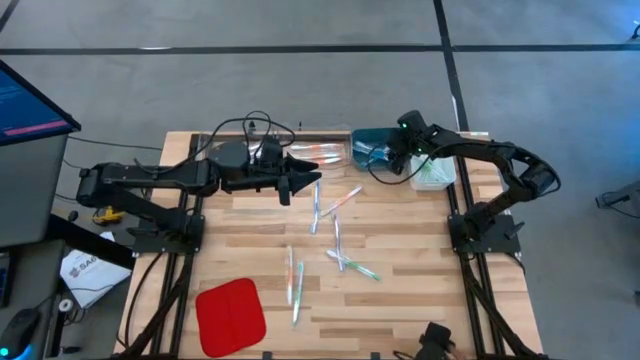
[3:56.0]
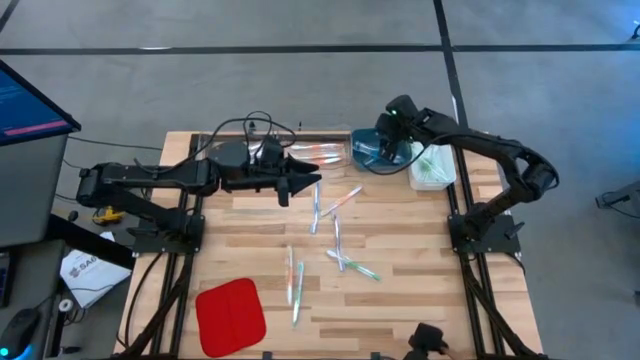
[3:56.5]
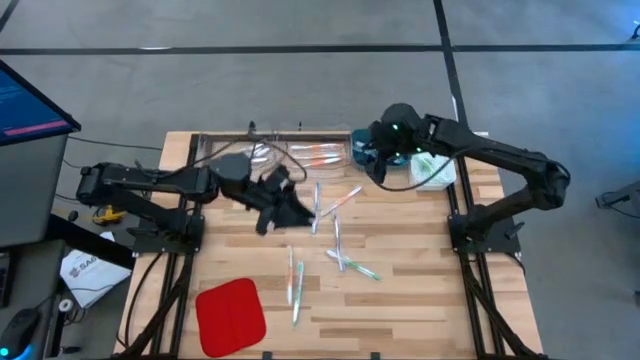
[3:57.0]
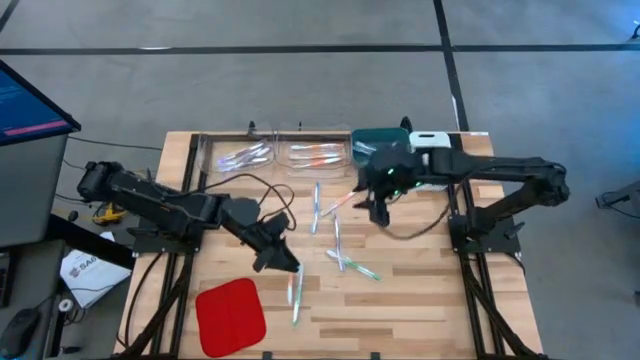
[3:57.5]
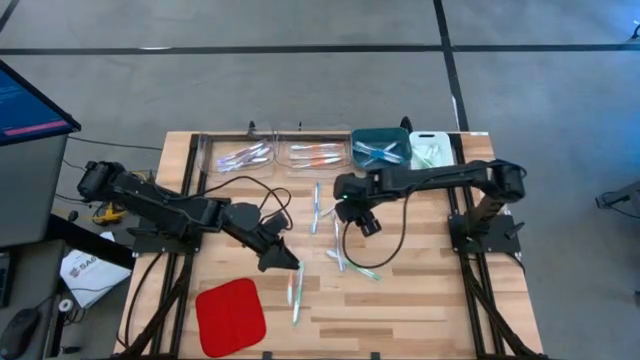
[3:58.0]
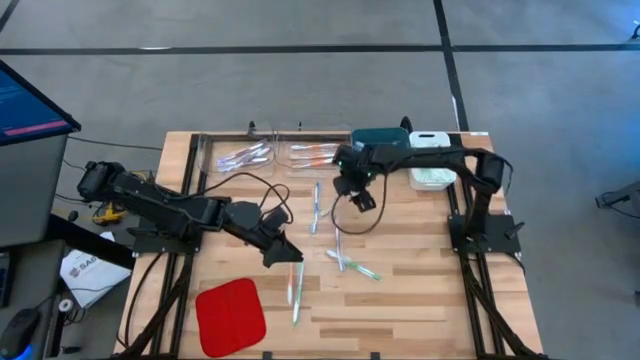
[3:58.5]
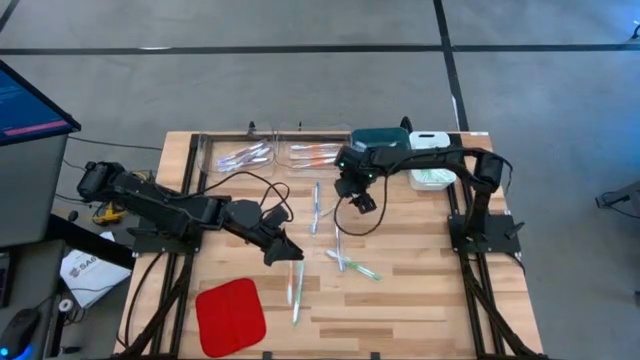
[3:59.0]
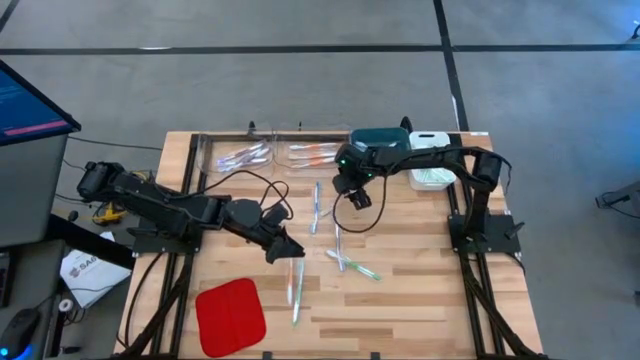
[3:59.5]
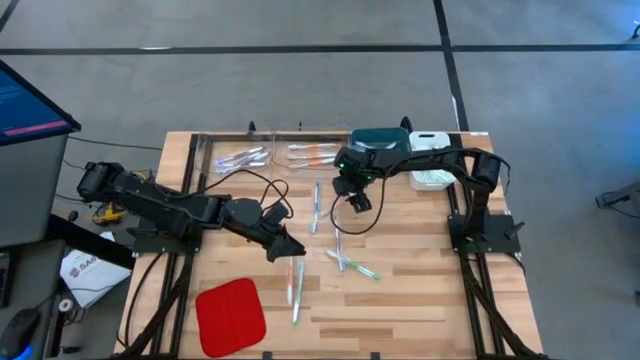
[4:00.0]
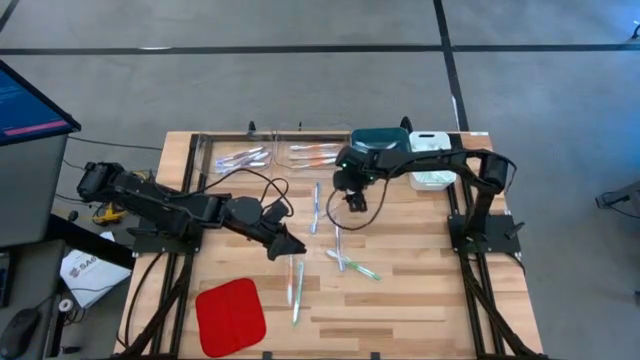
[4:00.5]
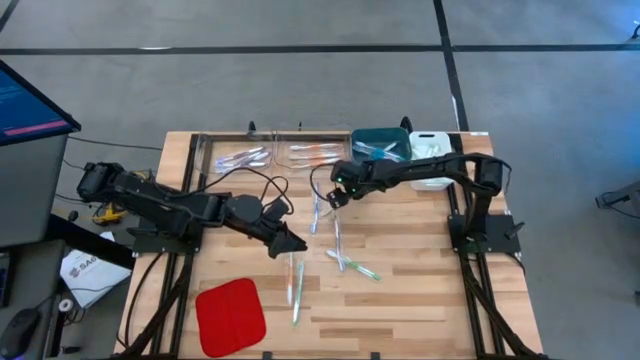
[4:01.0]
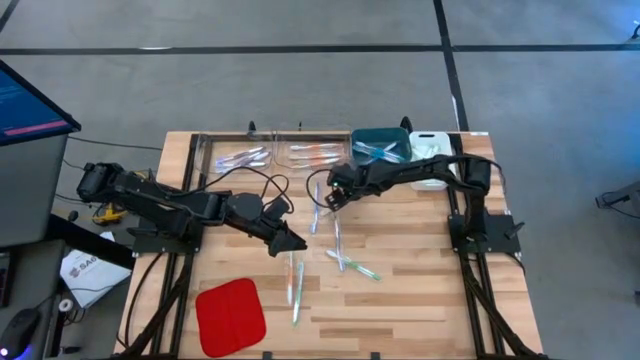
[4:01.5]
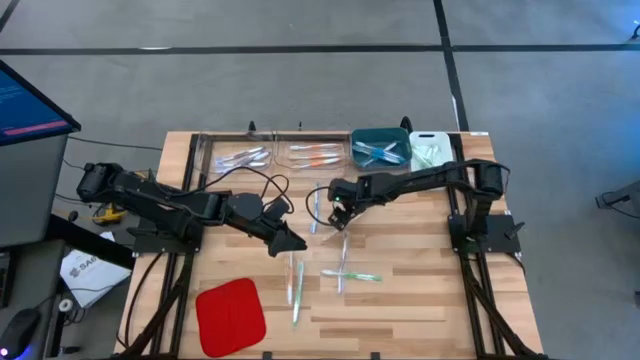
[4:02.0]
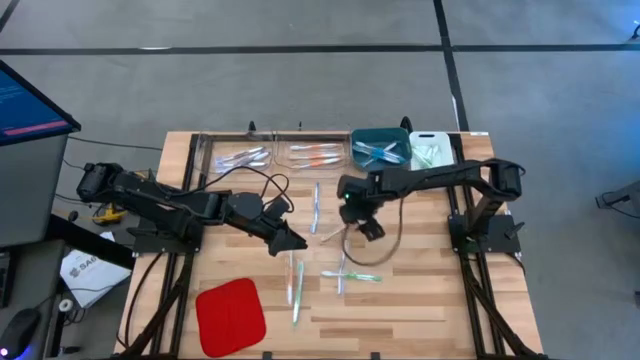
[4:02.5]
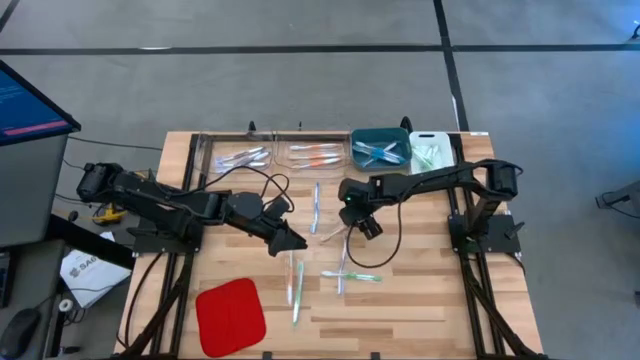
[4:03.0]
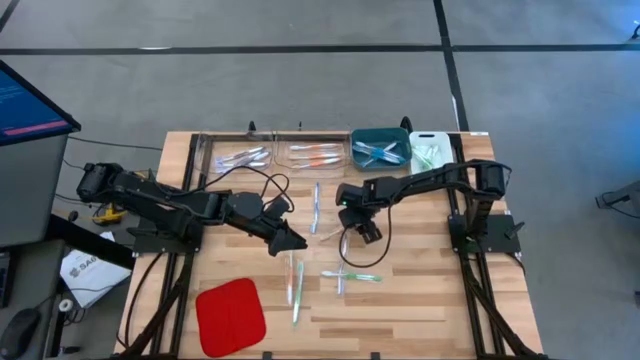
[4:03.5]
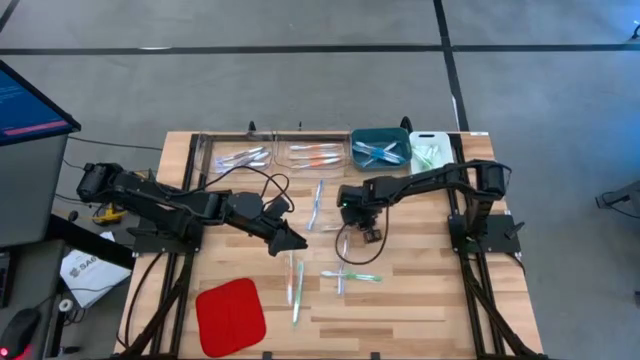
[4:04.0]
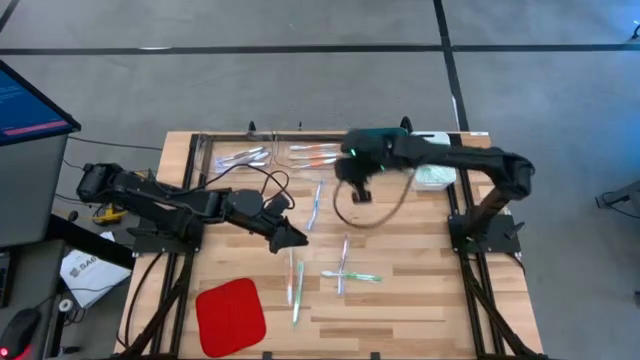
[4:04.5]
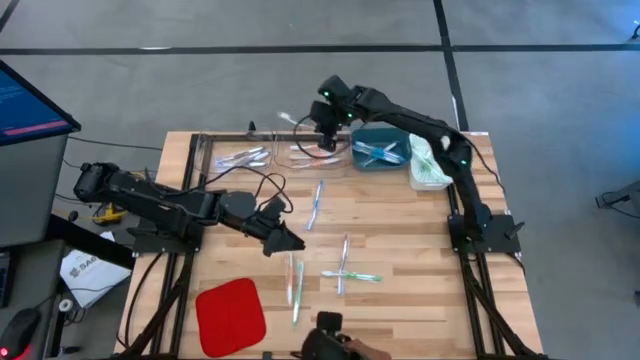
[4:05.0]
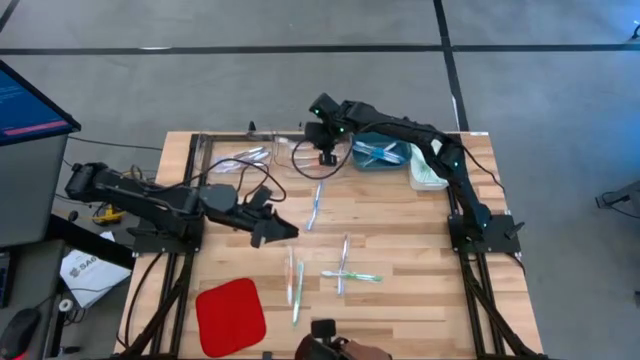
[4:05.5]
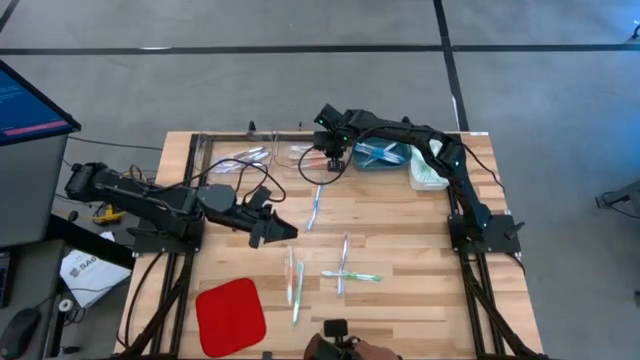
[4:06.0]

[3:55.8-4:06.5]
Task: Pick & Place Toothbrushes
Put the orange toothbrush into the right transparent bin

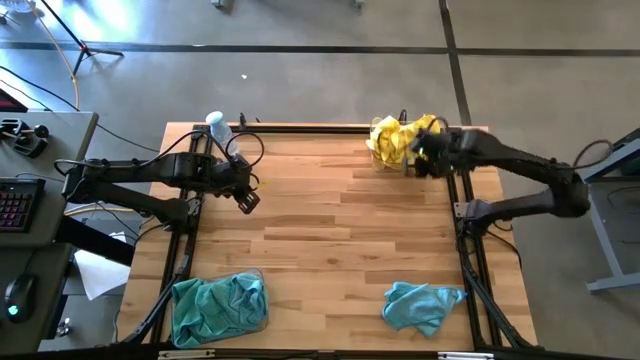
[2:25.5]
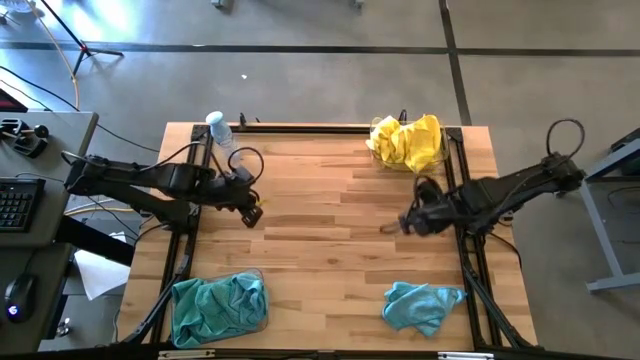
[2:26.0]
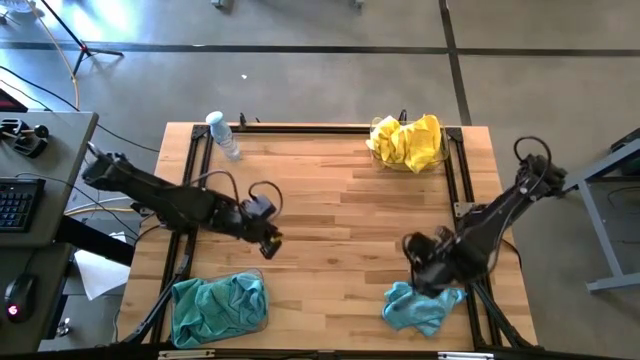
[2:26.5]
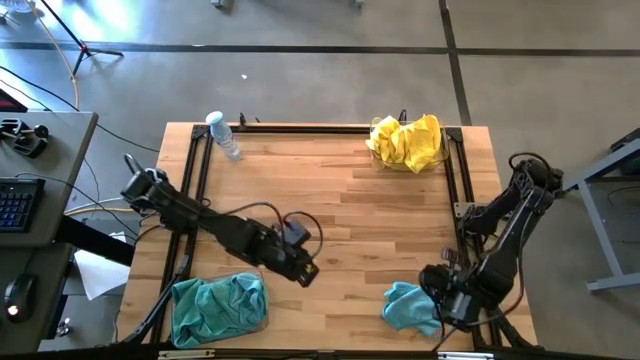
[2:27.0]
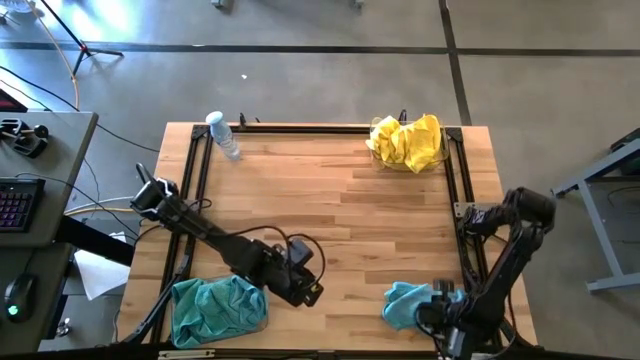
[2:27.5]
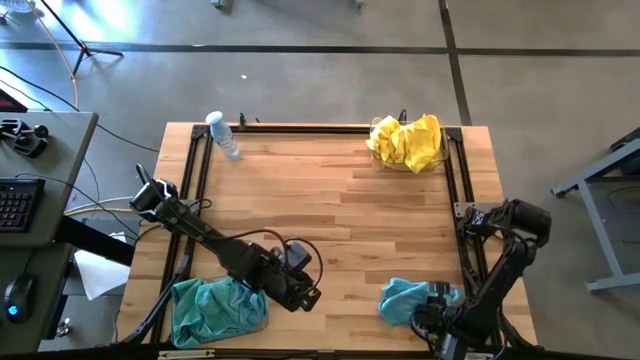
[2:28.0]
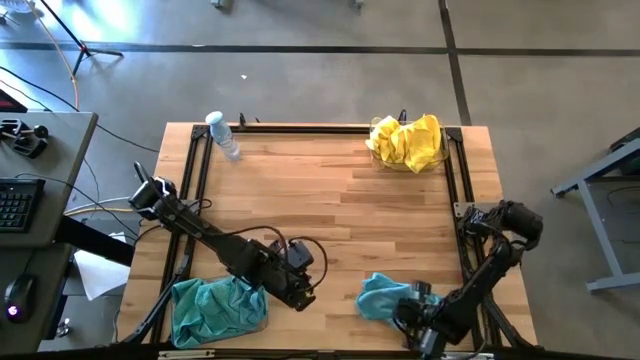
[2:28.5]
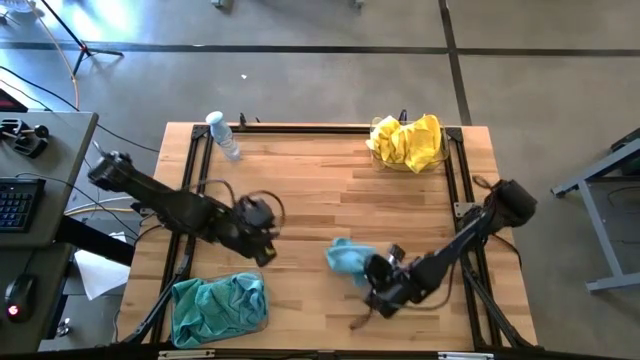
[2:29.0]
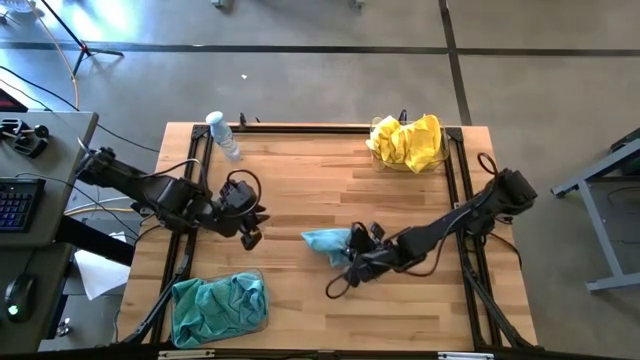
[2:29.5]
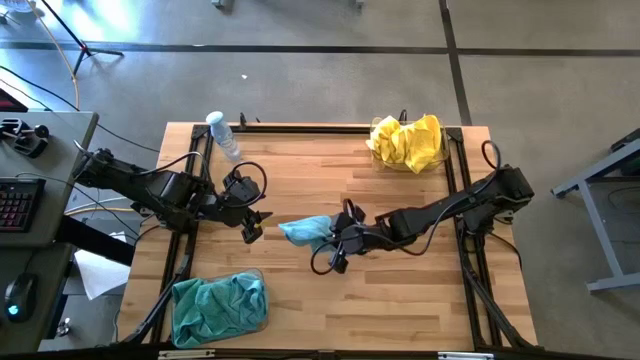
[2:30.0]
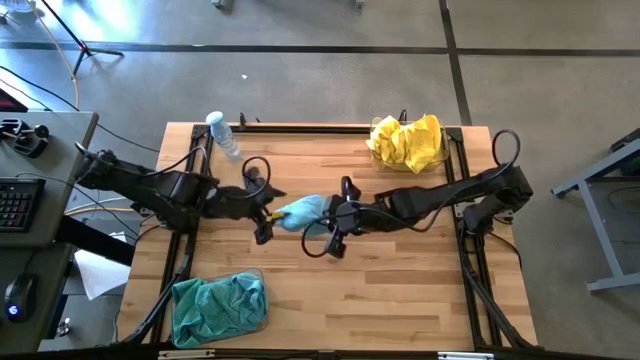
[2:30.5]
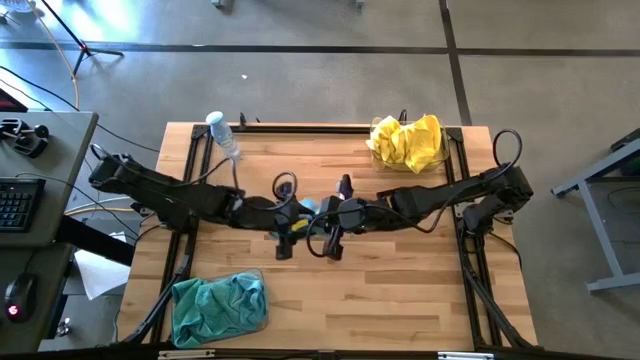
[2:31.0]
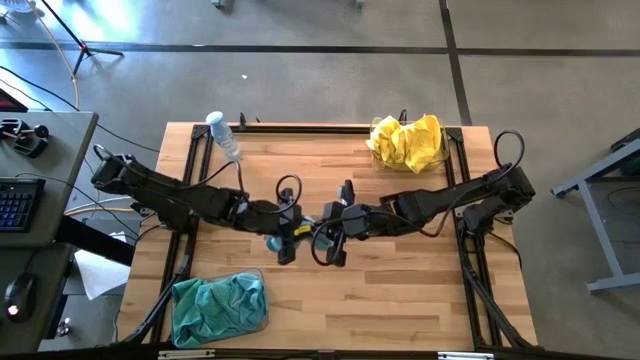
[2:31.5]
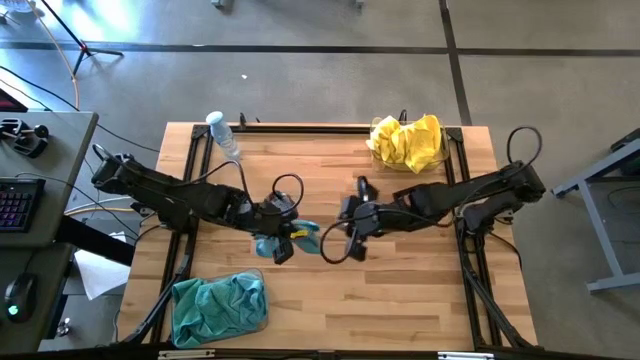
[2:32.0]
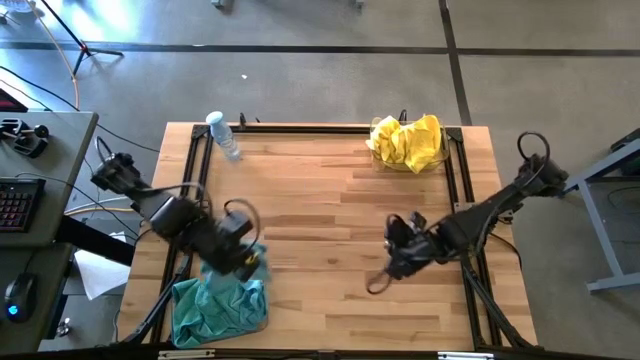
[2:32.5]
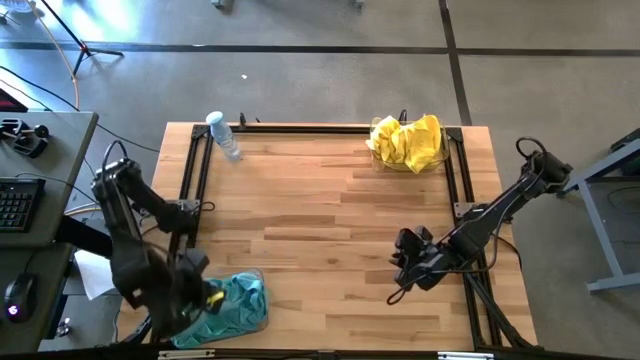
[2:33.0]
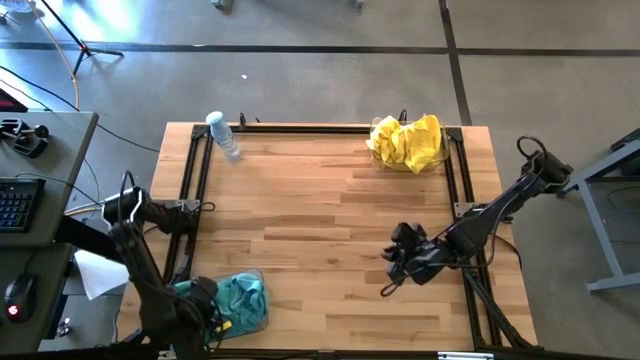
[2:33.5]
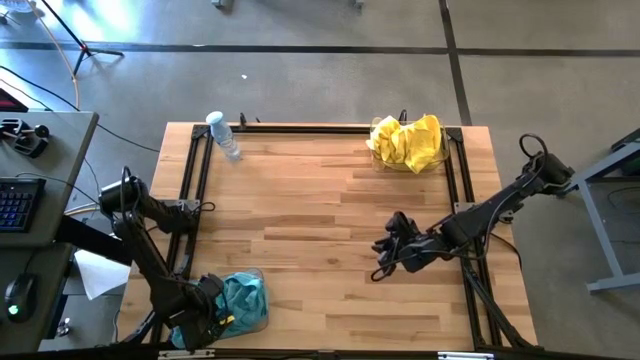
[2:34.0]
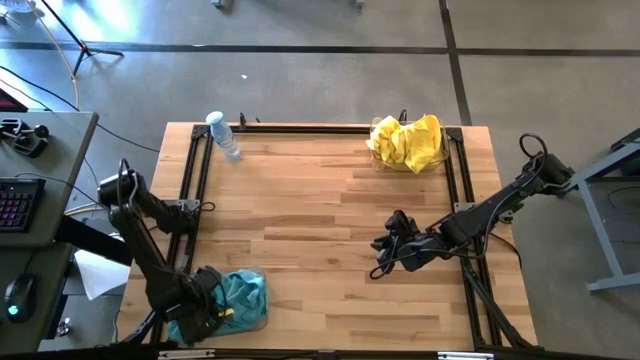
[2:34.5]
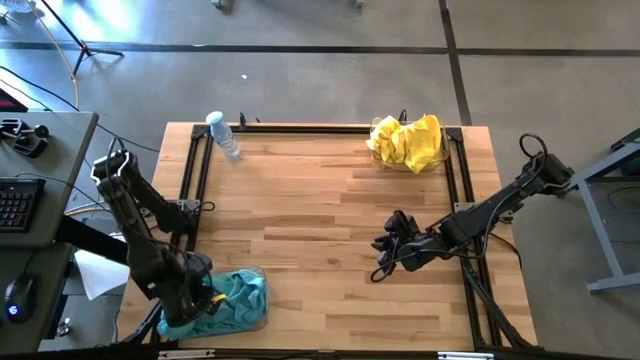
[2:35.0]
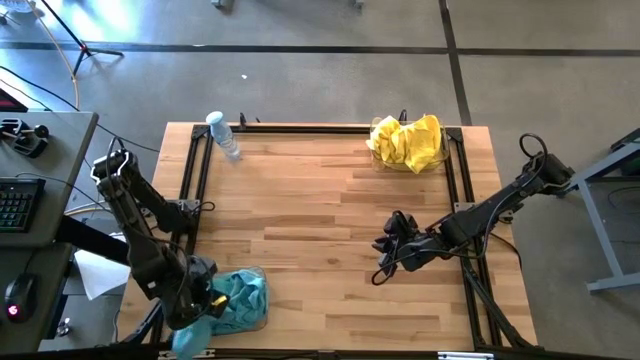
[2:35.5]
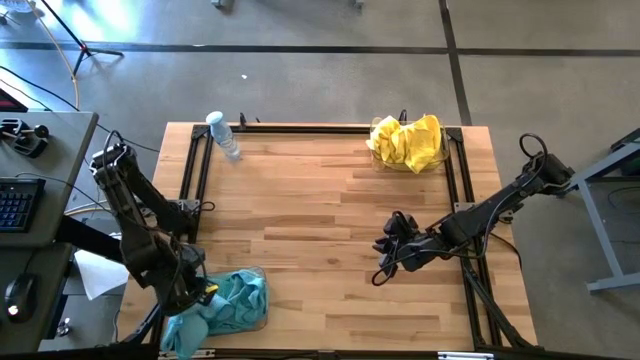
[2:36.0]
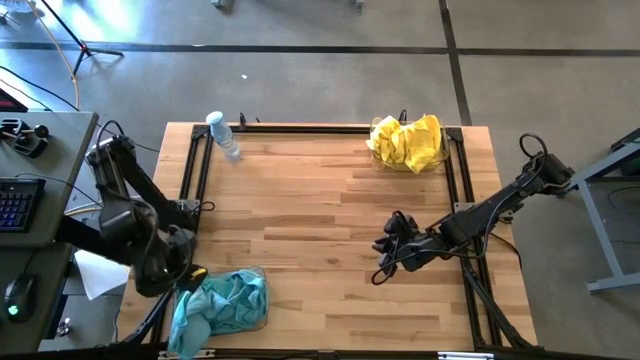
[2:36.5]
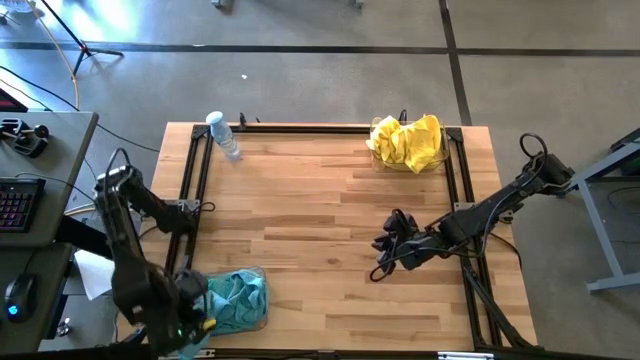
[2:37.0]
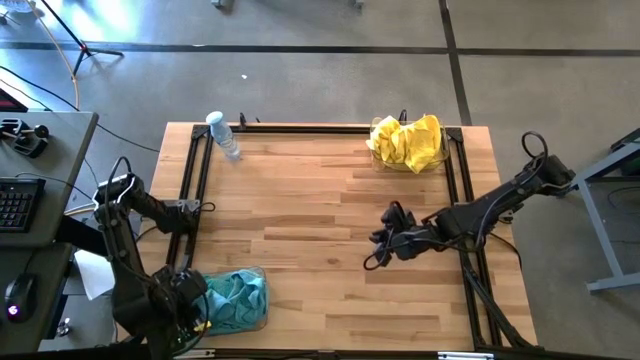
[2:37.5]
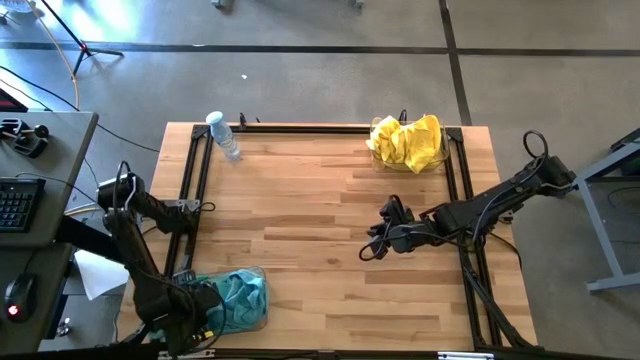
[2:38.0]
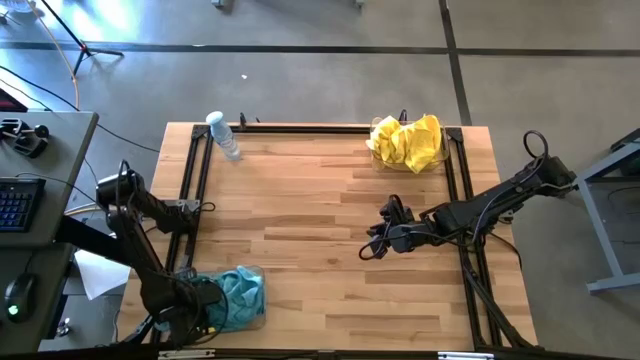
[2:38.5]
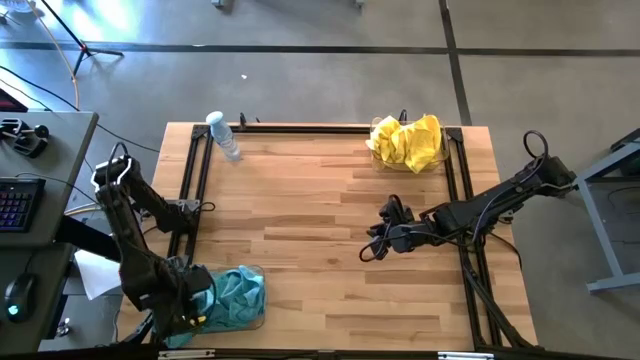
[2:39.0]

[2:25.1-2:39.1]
Task: Sort microfiber towel by color & place in baskets
Put the blue microfiber towel into the bottom transparent bin
